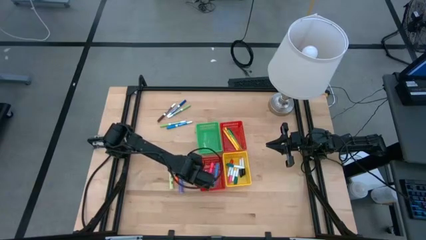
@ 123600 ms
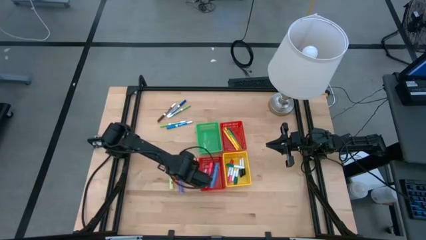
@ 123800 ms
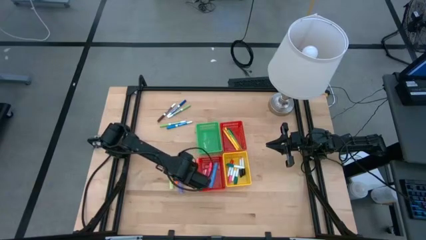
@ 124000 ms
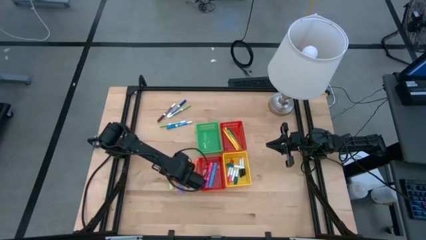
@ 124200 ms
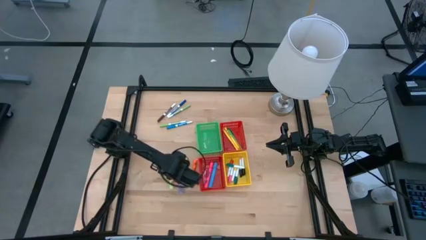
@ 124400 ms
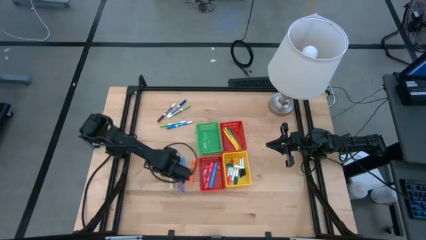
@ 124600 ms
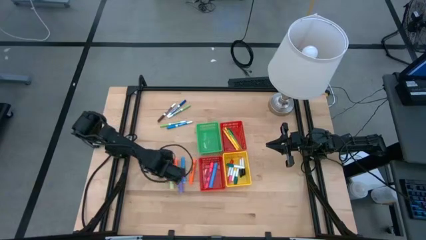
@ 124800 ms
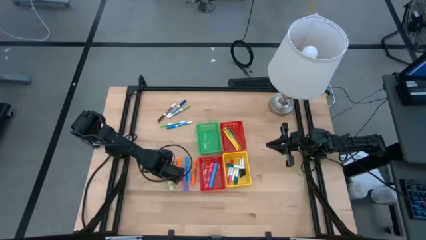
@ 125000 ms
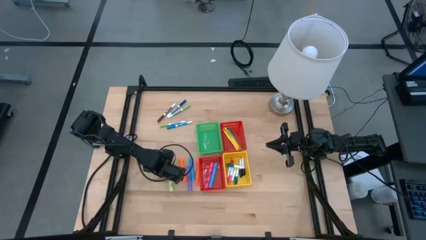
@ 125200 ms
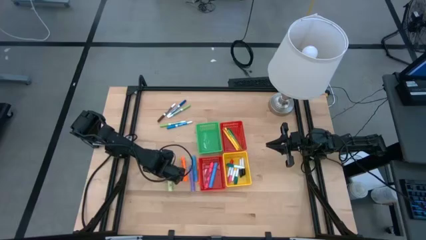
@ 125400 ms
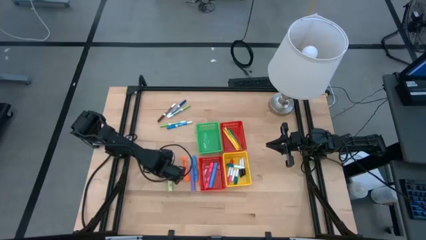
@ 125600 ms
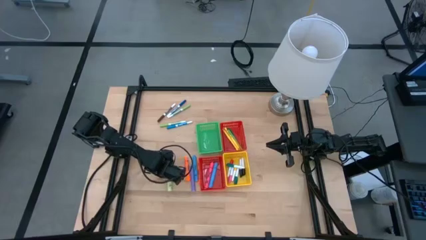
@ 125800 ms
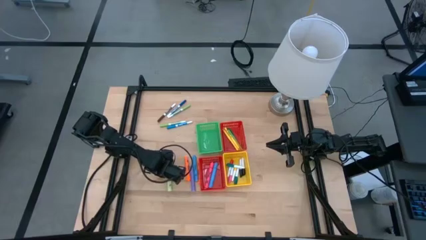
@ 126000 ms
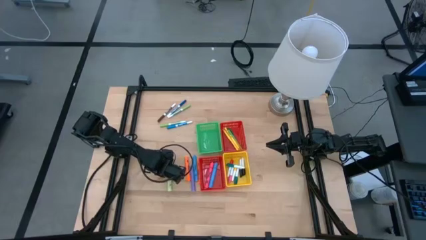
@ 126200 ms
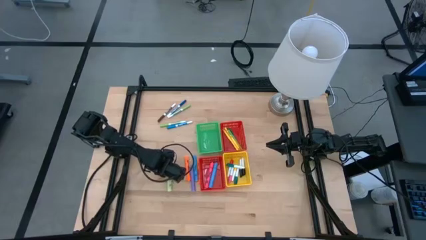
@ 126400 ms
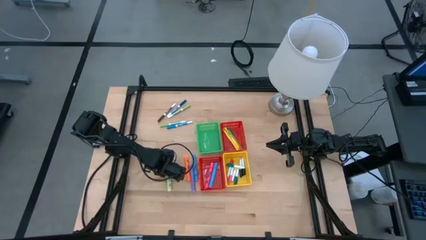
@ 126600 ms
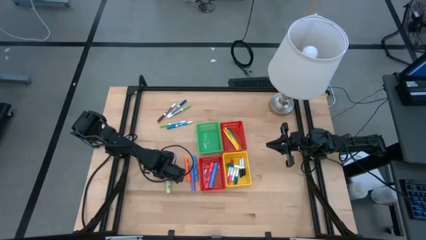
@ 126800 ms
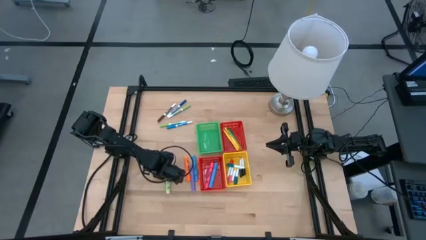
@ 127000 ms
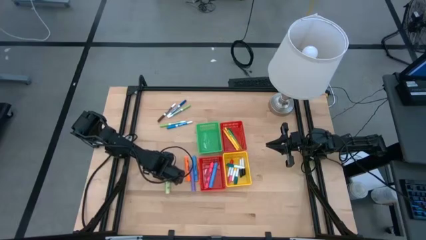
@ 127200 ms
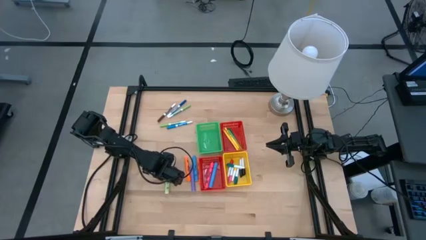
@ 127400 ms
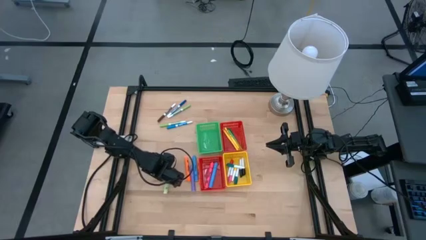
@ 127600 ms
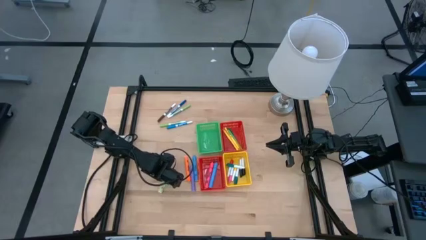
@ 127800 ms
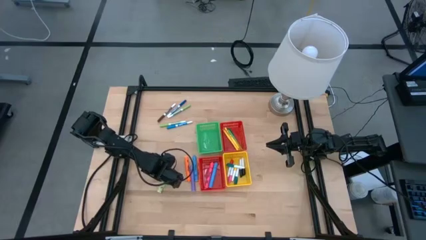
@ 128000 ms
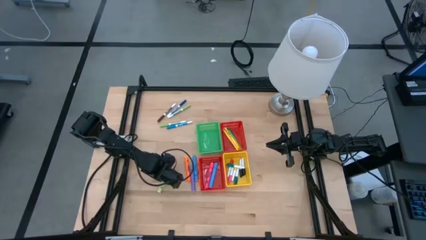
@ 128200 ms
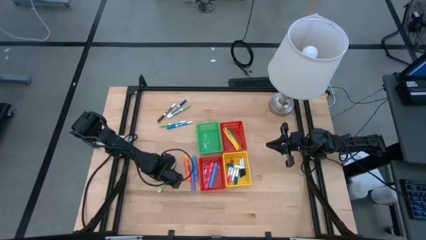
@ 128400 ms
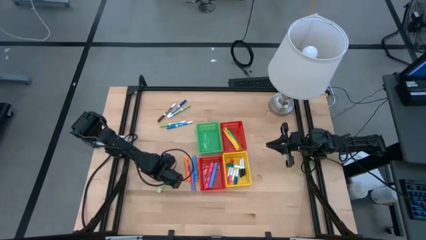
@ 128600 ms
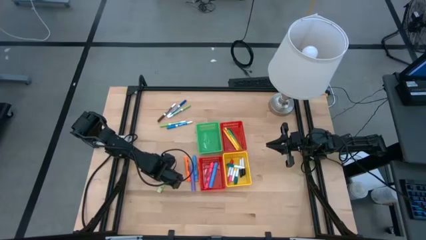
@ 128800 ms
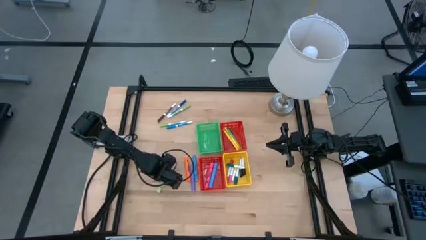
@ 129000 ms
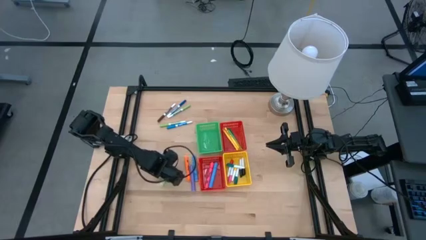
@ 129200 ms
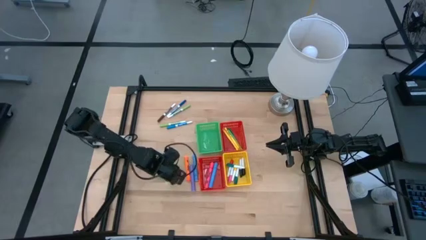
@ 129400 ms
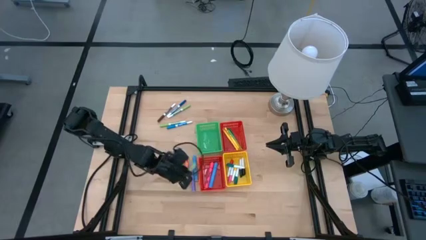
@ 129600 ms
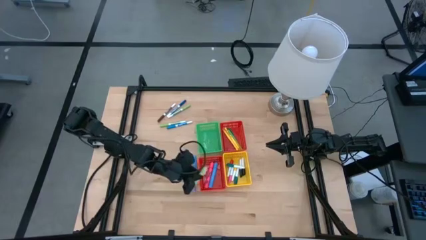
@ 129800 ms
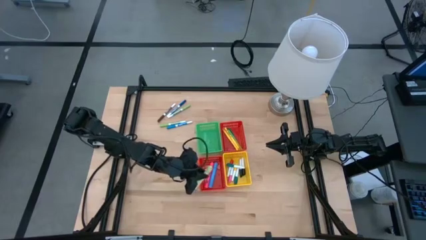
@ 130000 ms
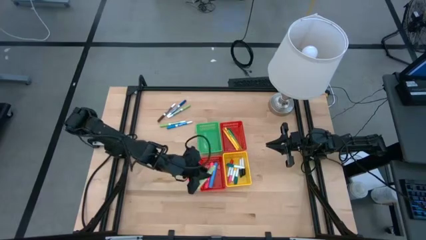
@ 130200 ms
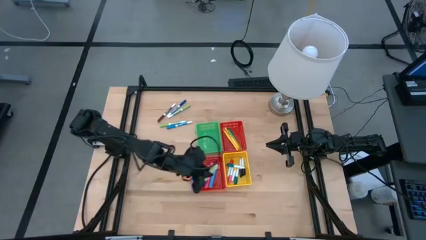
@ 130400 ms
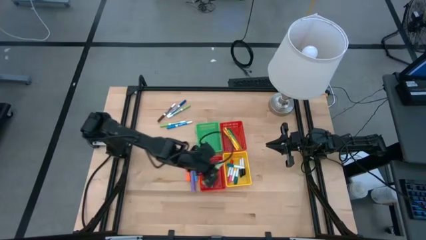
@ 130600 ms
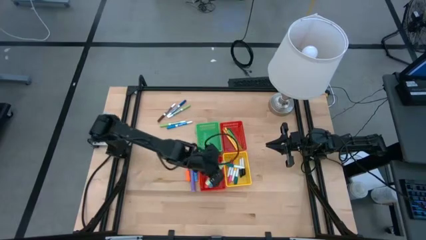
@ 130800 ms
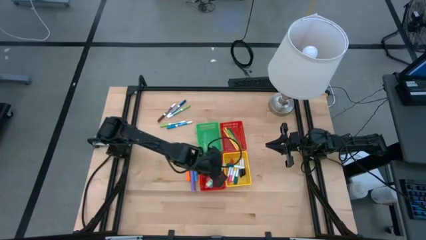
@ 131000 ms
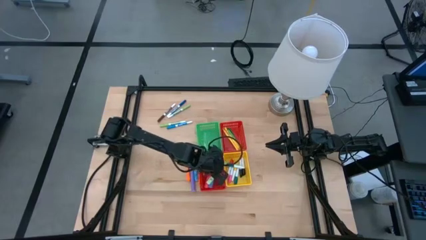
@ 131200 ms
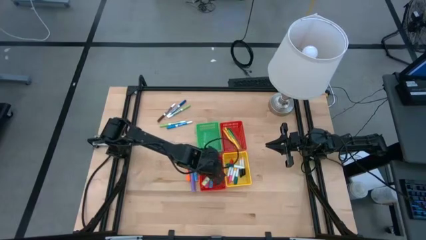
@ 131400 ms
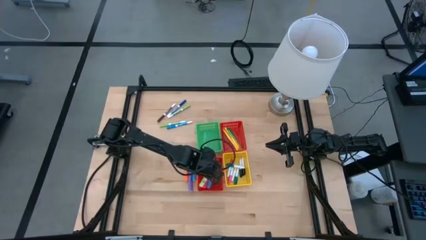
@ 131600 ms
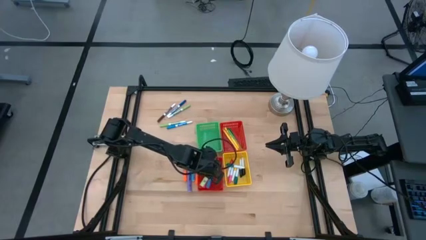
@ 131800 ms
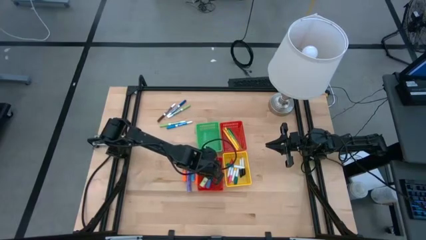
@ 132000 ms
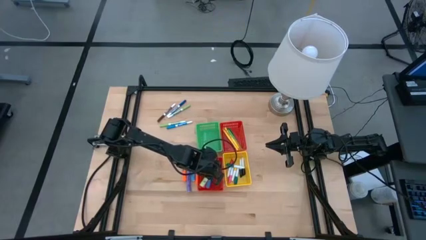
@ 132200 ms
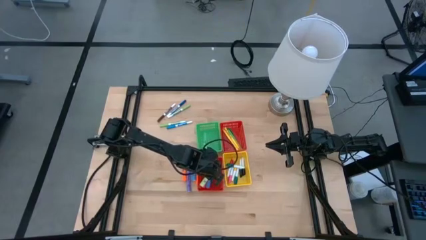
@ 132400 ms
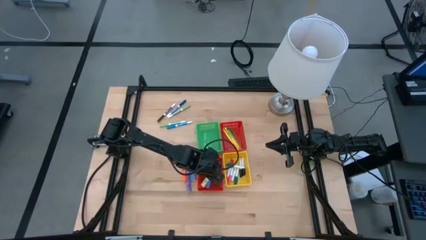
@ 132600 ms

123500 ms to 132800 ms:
Task: Pick & Place Markers
Put the large green highlighter into the bottom red bin
